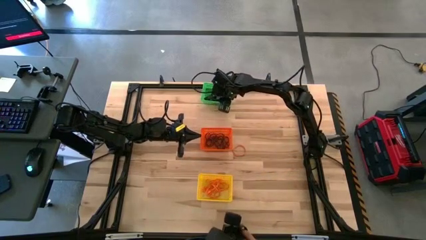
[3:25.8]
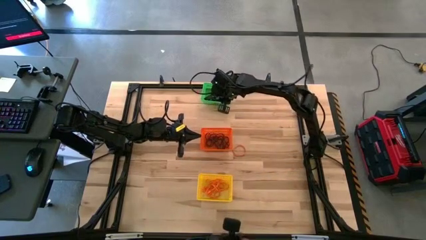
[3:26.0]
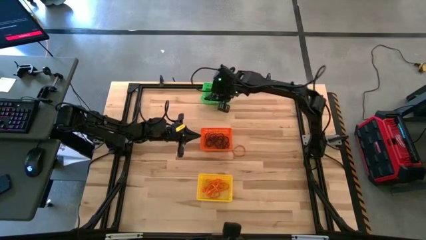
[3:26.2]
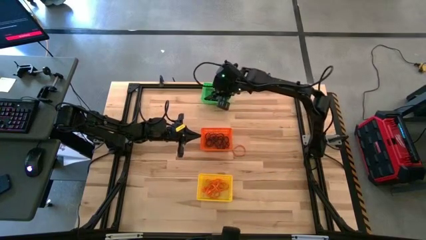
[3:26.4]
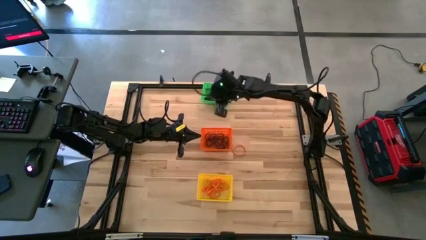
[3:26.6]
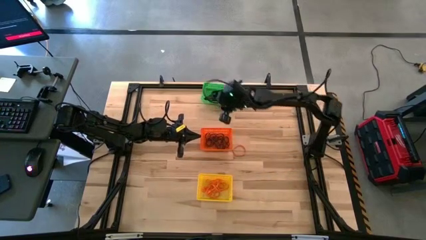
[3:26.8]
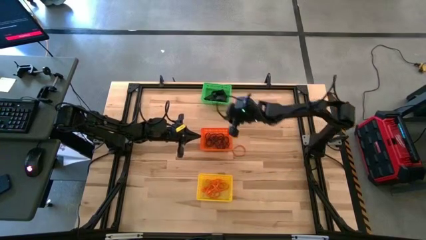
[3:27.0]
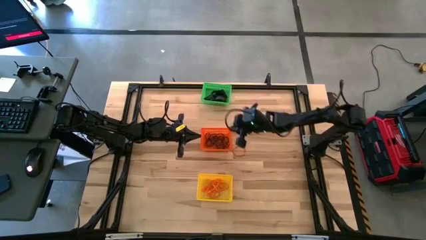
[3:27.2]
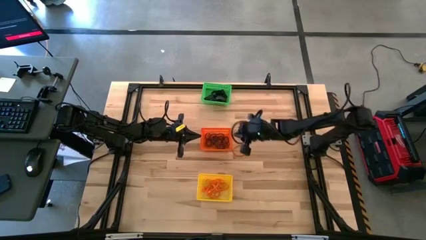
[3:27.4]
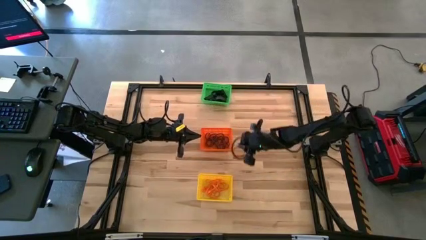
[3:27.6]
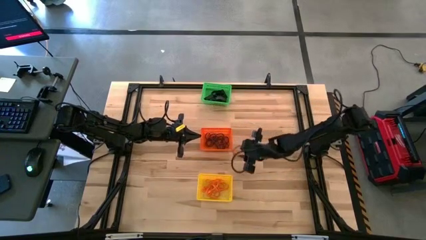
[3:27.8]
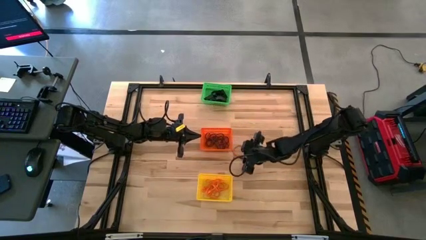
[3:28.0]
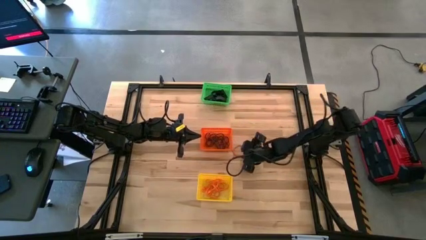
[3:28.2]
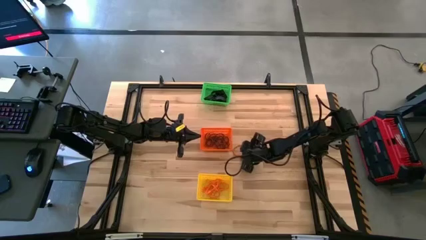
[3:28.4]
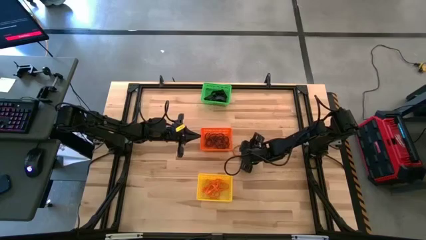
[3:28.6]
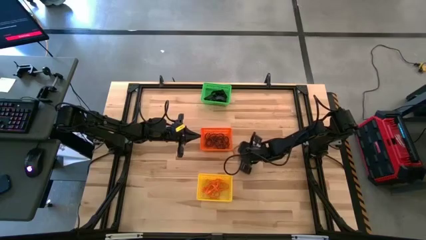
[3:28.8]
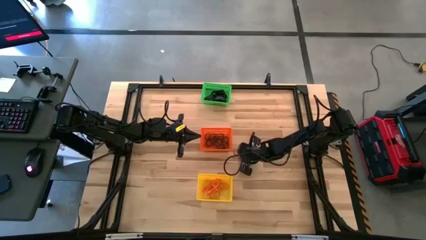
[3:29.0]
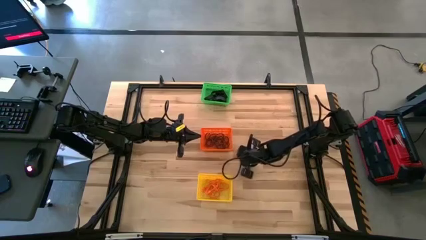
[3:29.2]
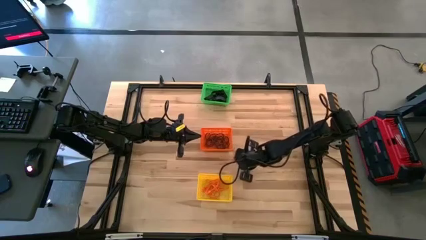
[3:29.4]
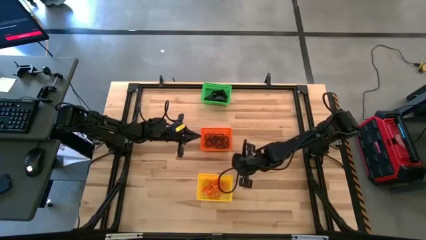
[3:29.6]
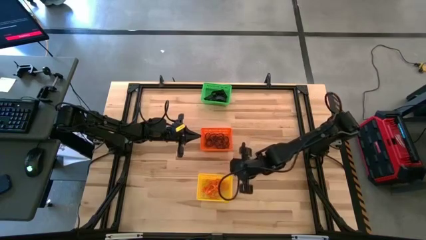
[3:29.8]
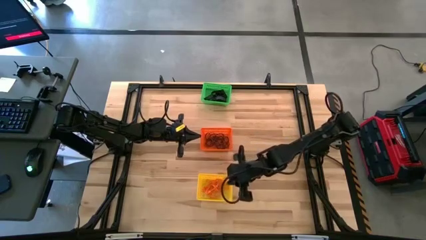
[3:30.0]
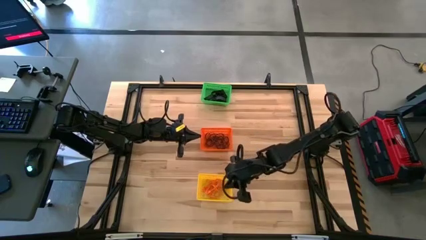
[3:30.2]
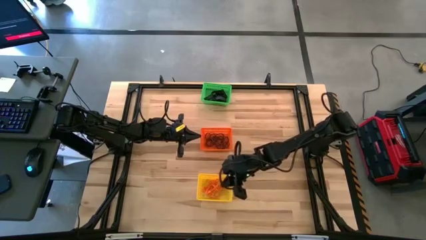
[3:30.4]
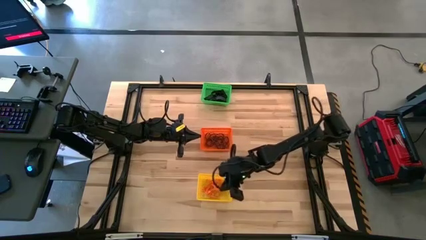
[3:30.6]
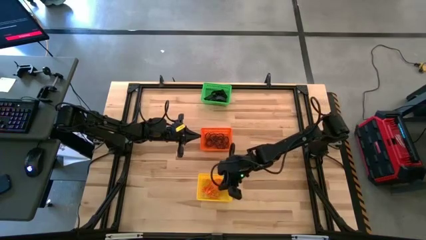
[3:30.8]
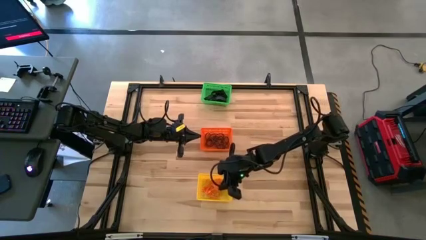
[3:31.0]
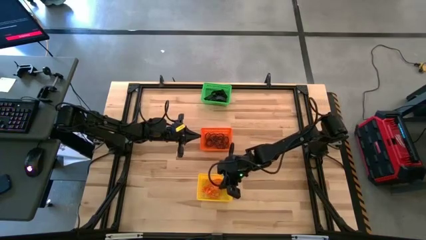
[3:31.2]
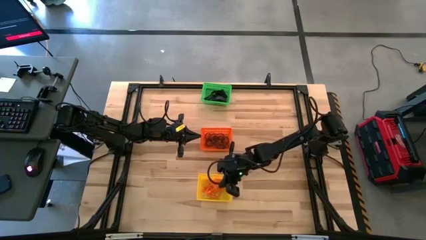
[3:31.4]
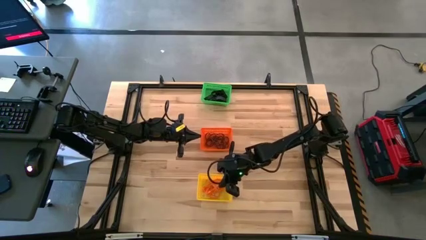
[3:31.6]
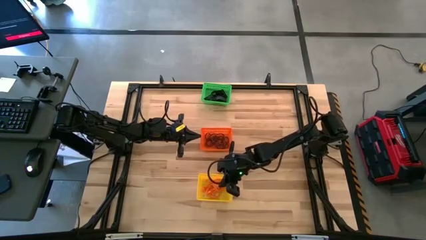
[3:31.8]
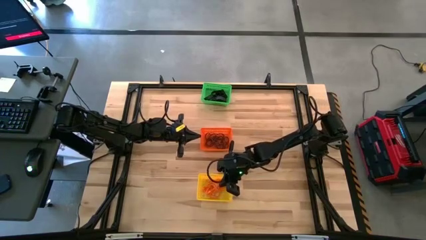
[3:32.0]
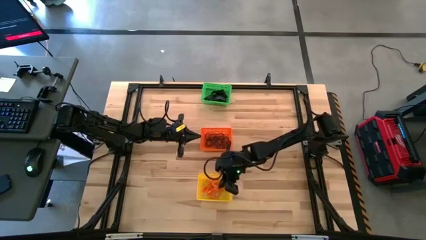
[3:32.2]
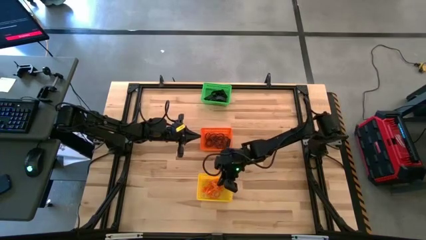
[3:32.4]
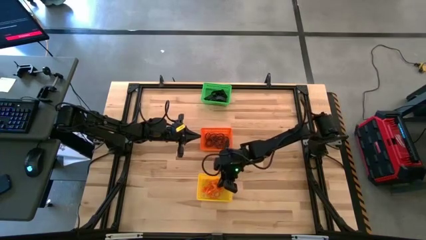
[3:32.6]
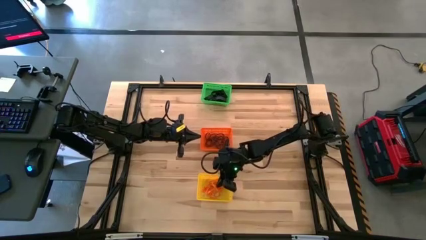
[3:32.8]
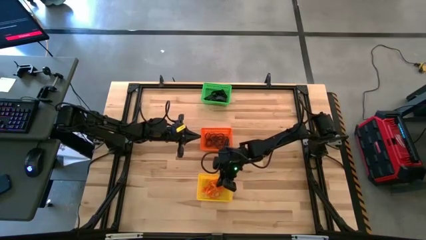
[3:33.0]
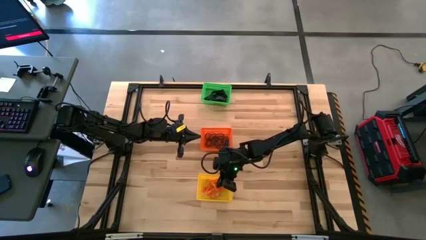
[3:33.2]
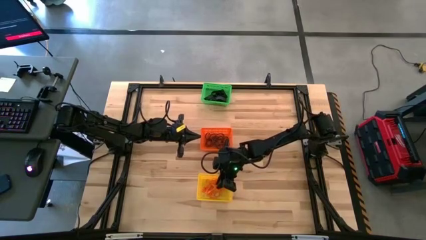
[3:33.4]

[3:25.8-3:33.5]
Task: Sort rubber bands into baskets
Put the orange rubber band into the yellow bin

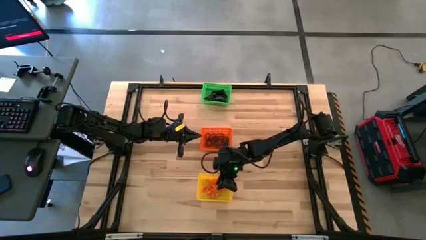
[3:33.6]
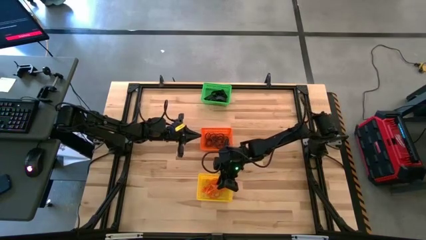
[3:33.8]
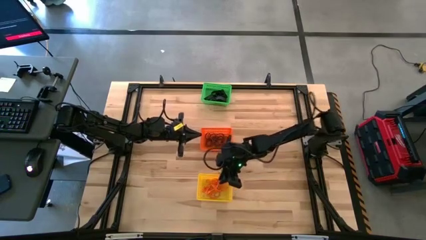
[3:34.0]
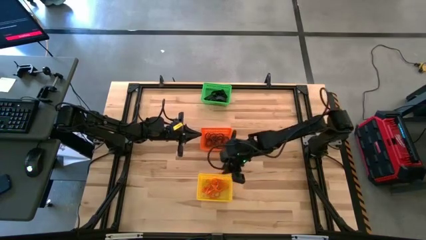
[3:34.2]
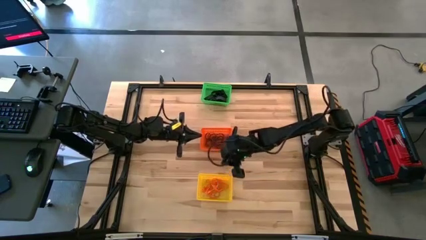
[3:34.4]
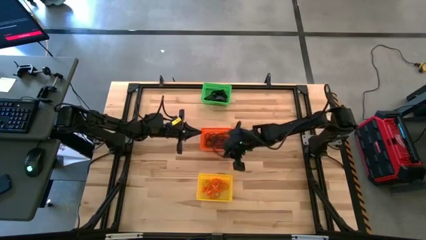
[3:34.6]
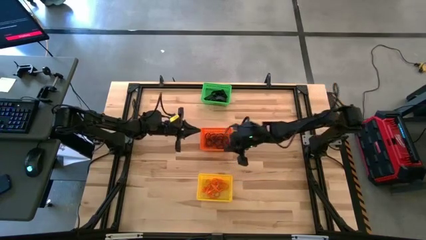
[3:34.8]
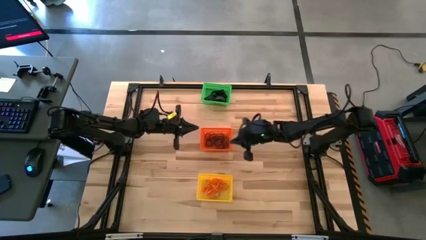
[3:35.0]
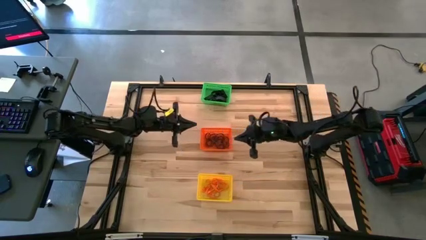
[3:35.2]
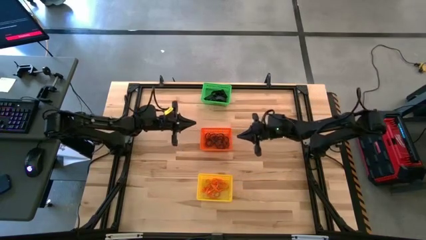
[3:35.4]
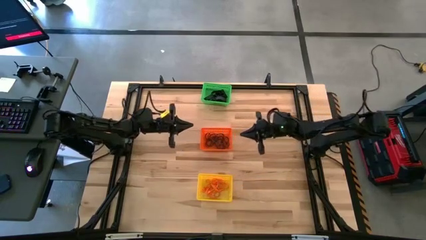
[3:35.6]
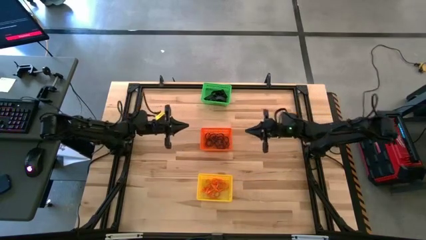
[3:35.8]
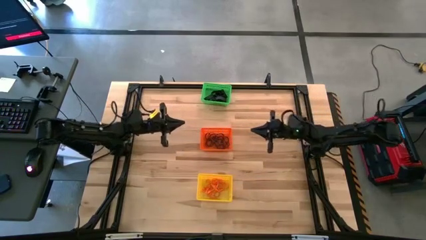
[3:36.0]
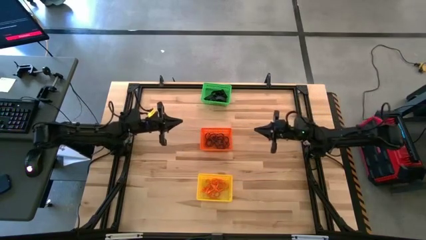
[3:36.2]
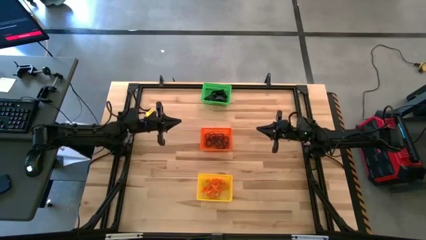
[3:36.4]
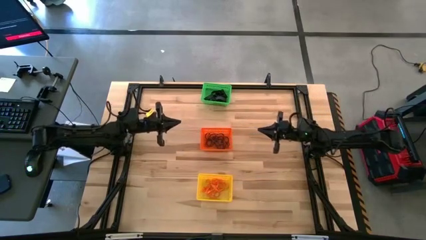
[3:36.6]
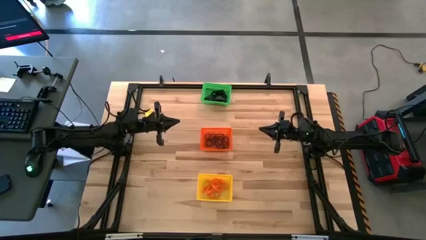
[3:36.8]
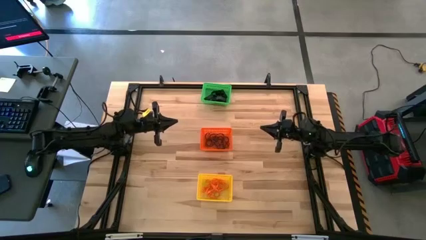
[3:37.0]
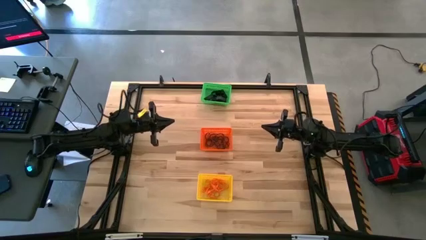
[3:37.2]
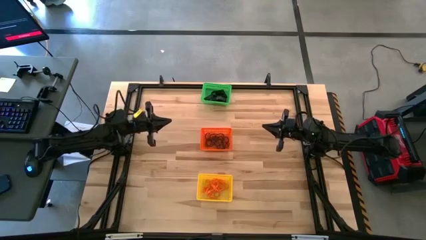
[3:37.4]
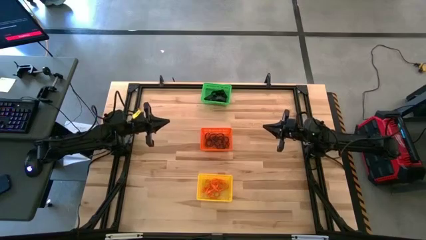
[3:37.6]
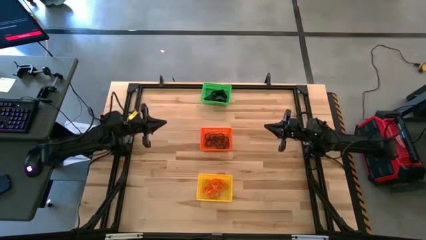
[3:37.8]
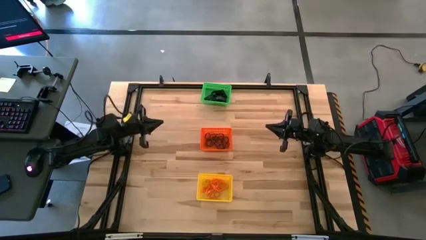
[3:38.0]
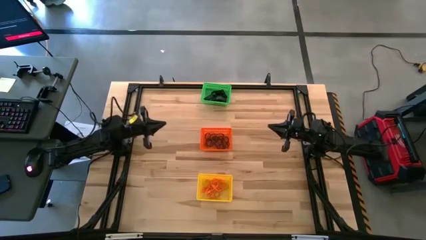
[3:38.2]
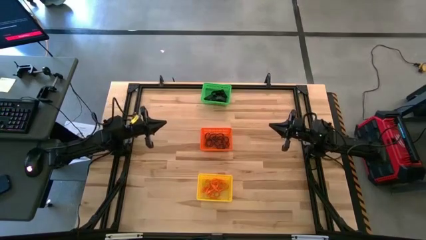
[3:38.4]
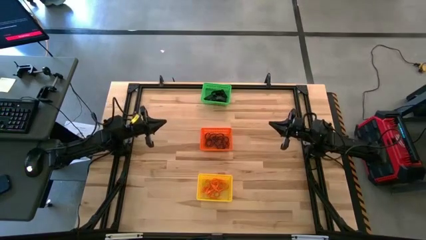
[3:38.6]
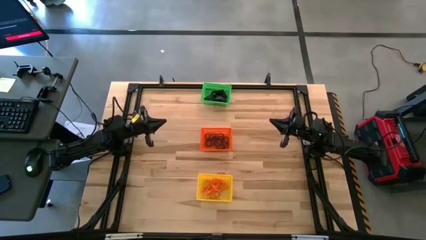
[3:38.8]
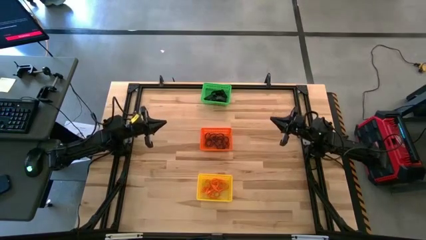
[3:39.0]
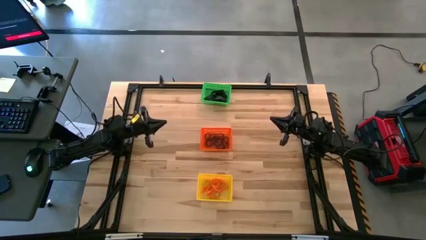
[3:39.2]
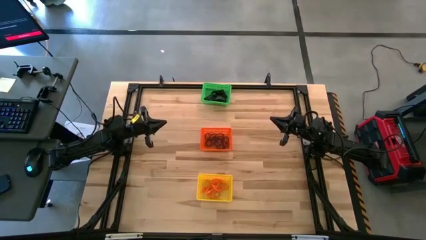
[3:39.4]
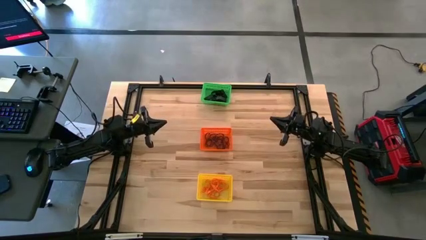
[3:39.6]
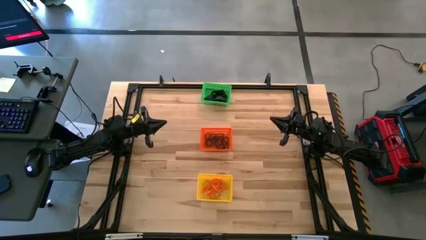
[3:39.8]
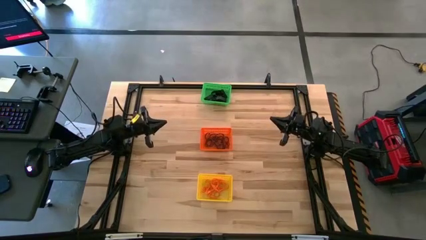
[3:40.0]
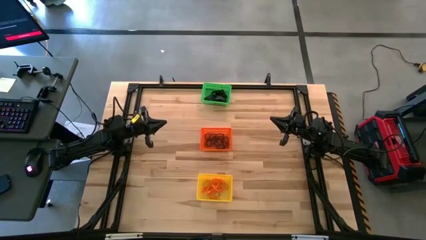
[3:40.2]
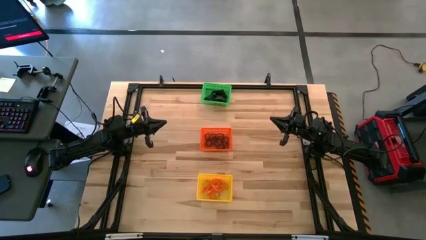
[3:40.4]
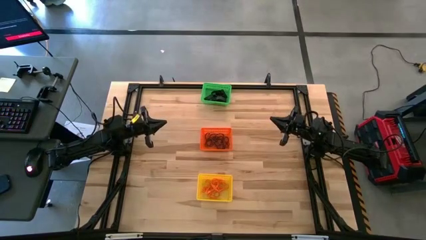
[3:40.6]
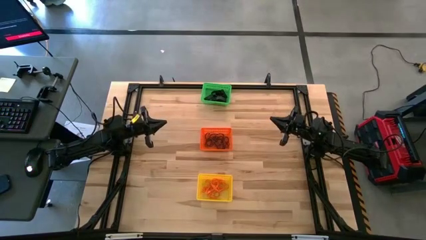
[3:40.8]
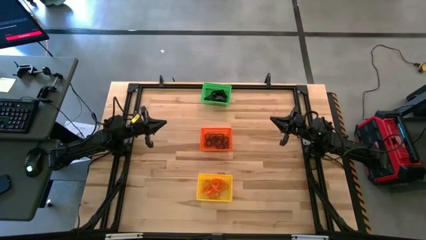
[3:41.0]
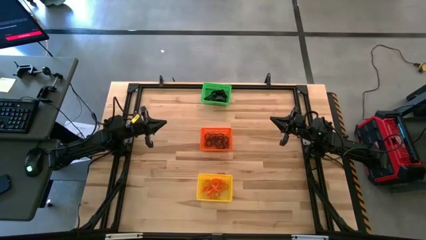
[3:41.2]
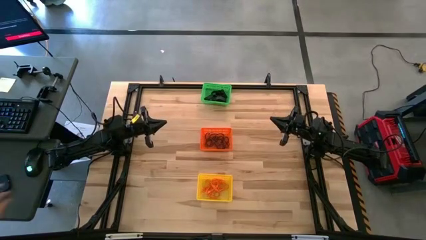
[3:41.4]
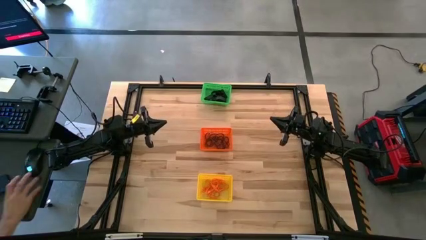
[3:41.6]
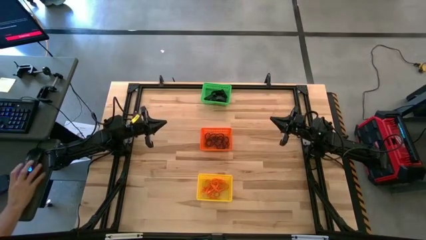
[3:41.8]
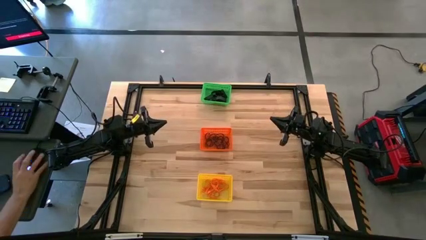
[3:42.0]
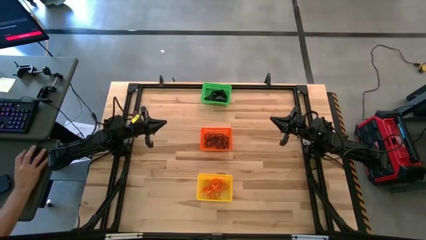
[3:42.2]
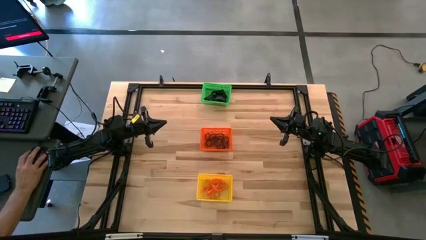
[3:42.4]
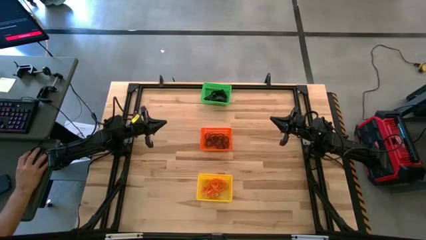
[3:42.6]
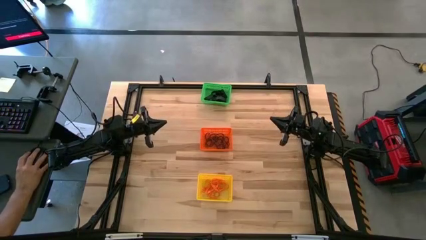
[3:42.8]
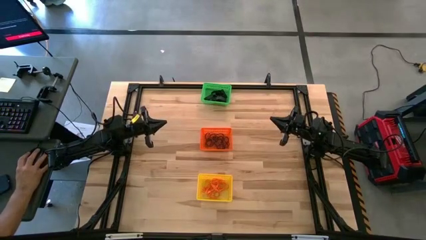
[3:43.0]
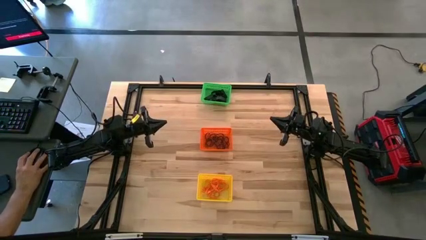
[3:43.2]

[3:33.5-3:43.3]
Return to Home Position
